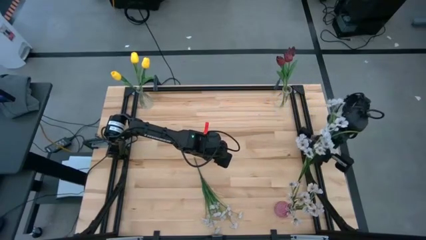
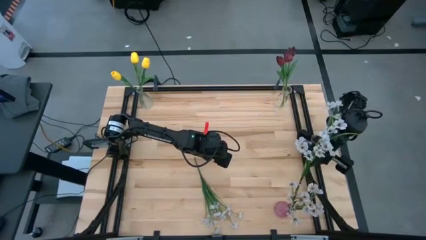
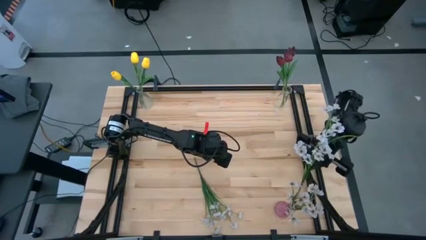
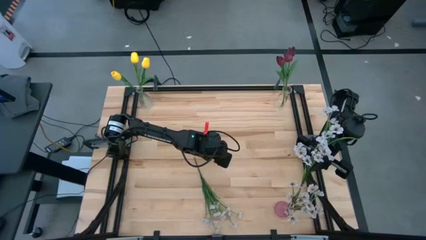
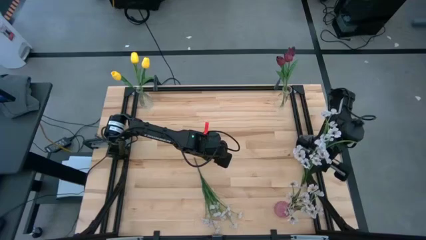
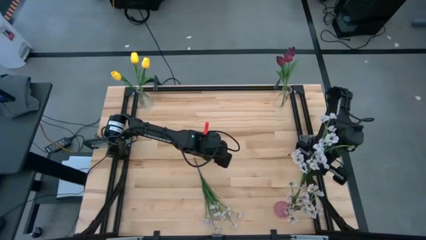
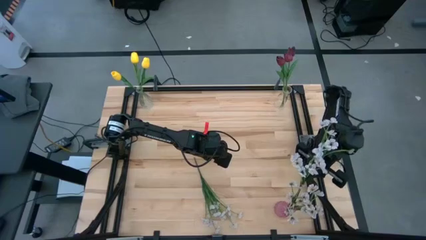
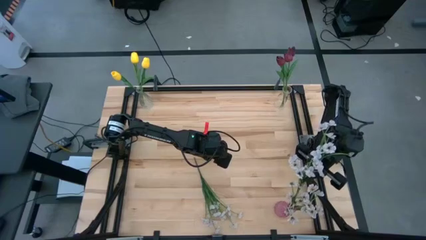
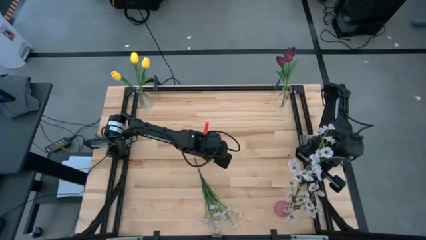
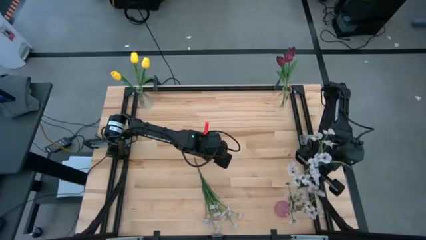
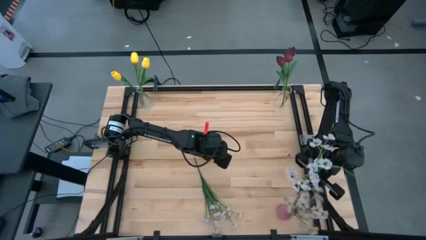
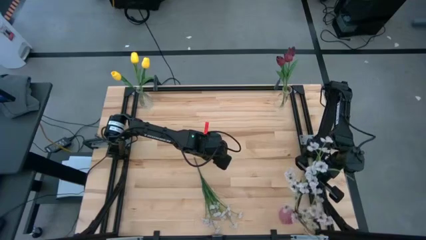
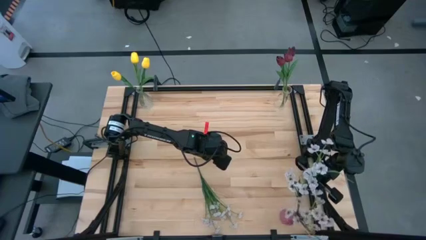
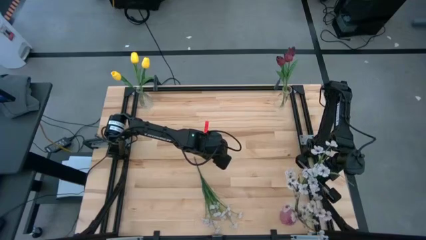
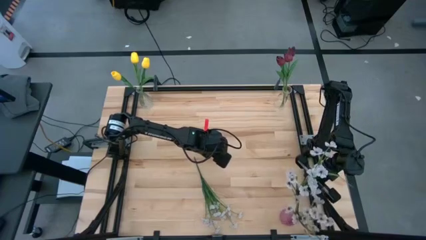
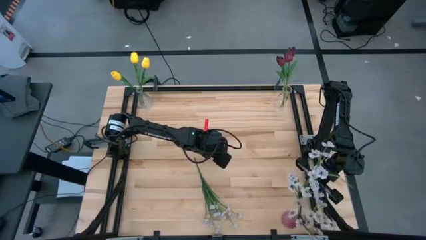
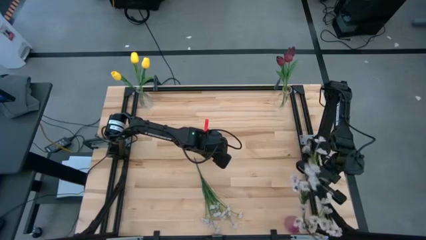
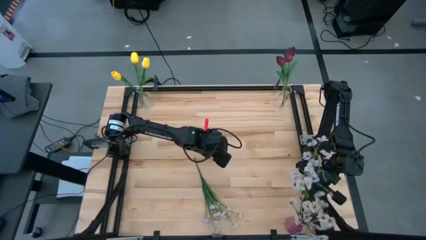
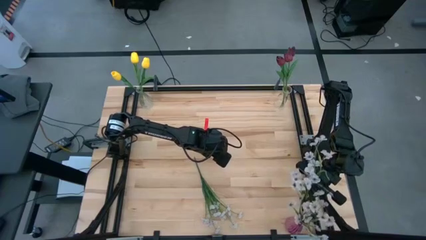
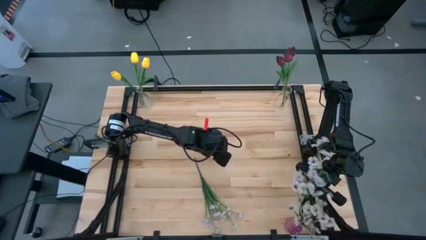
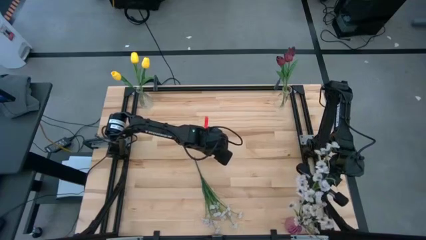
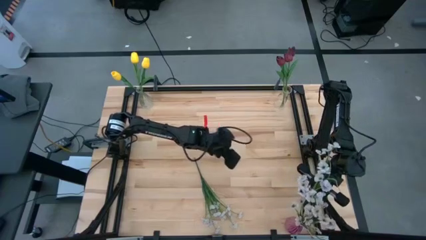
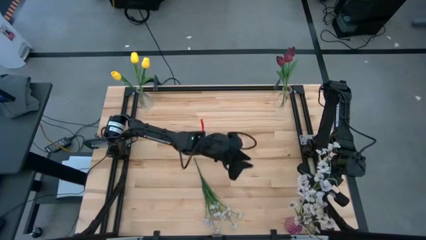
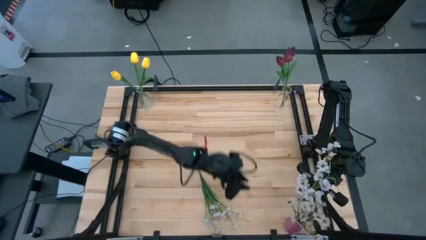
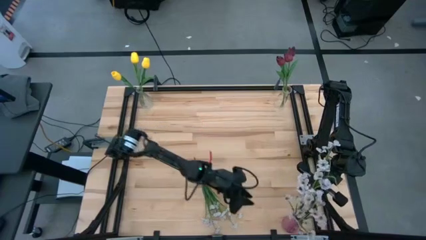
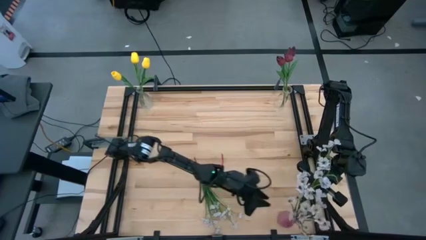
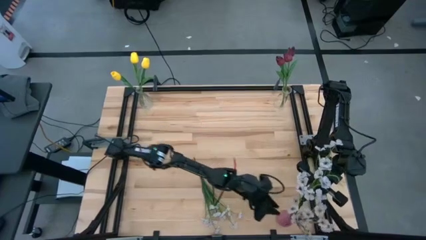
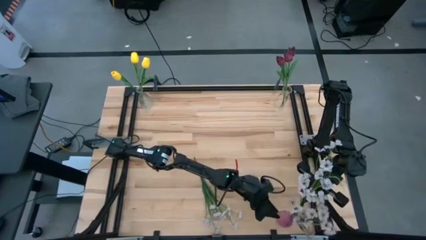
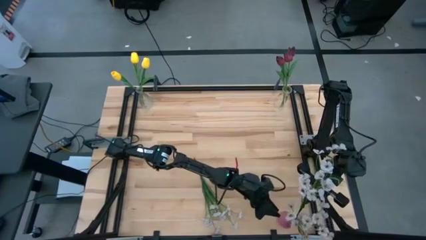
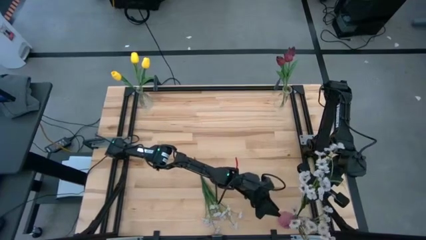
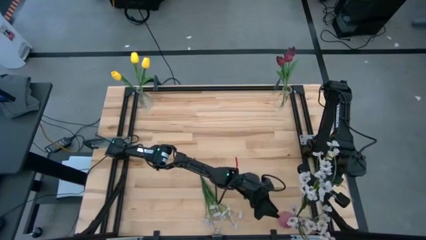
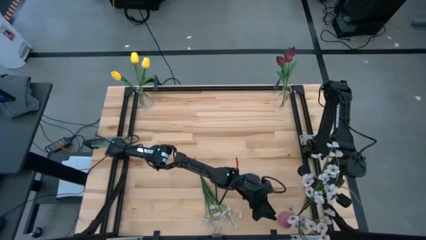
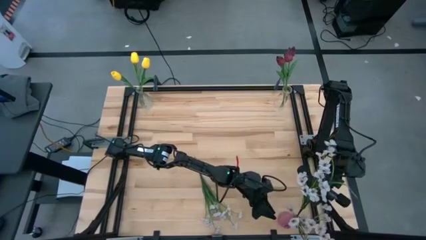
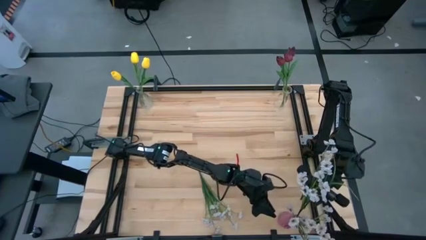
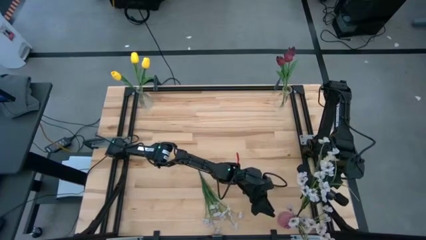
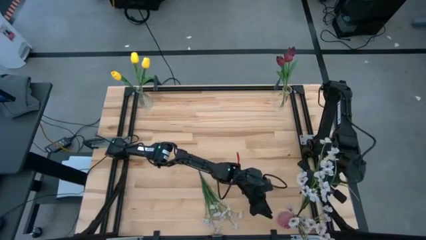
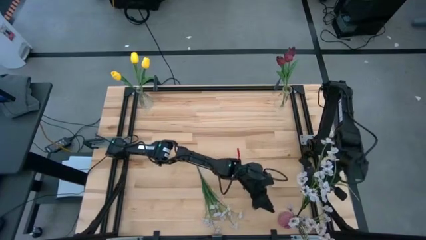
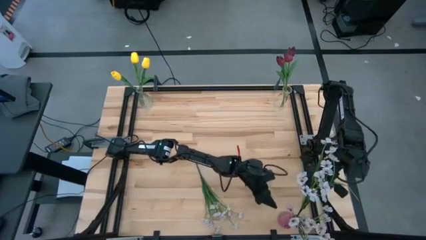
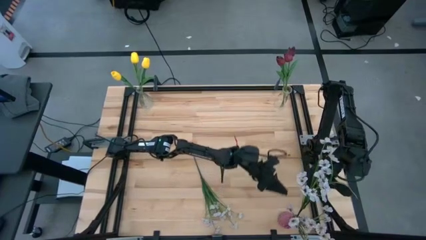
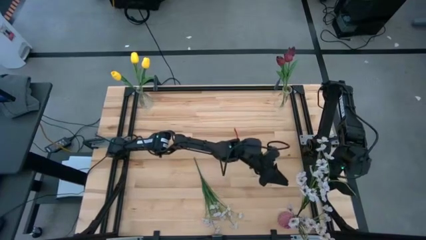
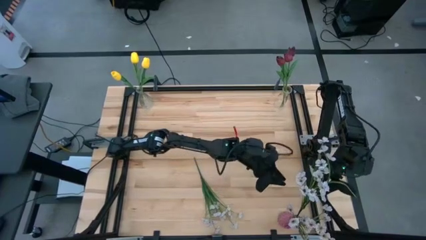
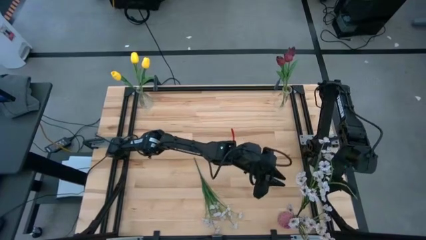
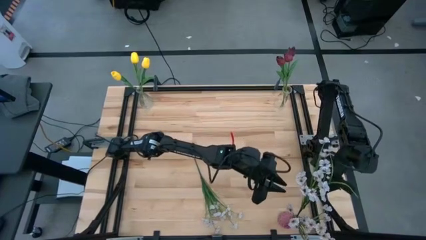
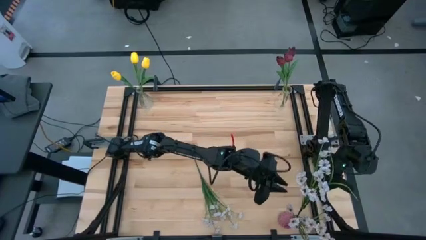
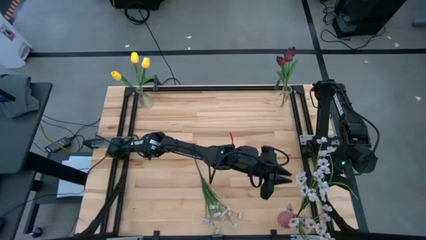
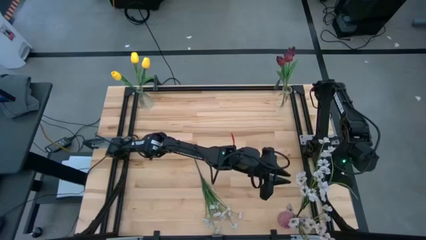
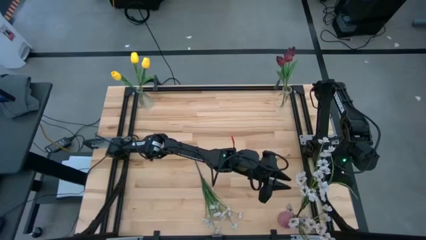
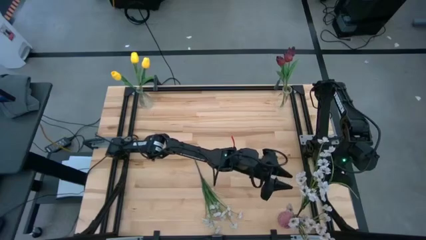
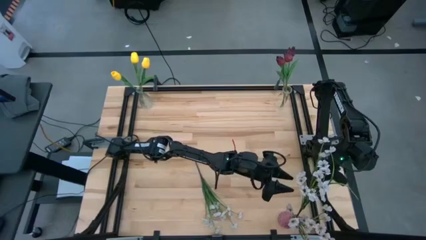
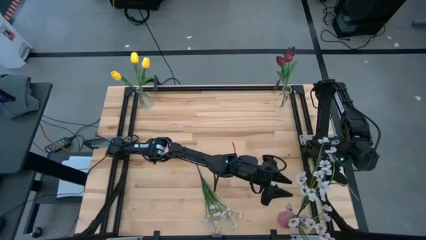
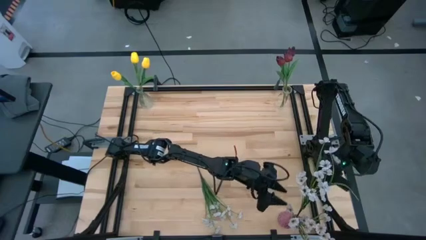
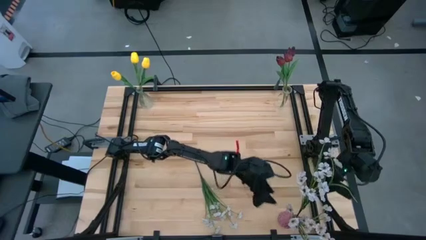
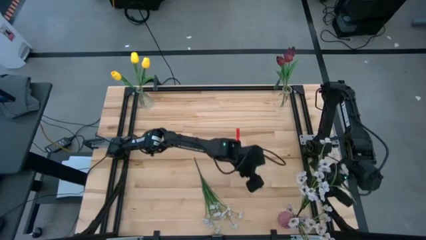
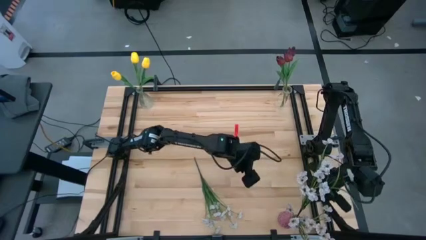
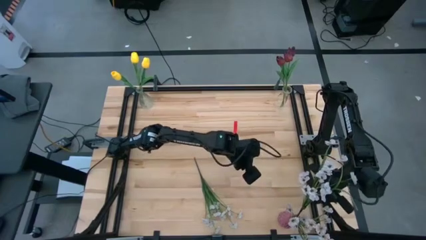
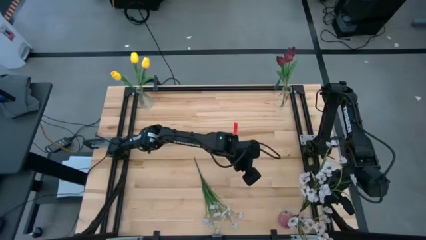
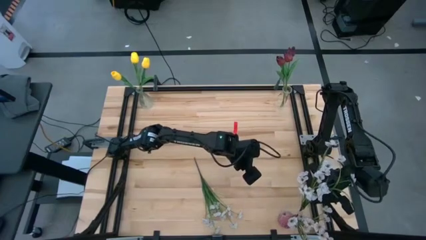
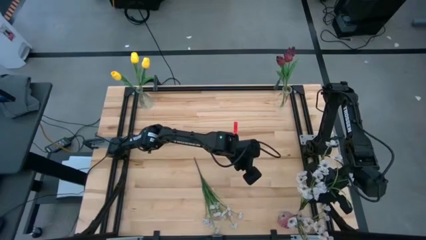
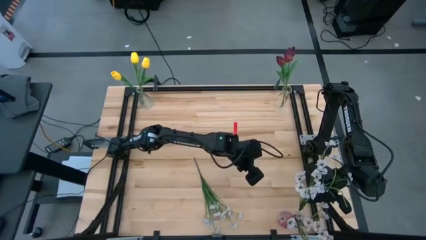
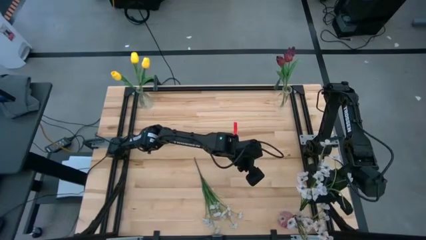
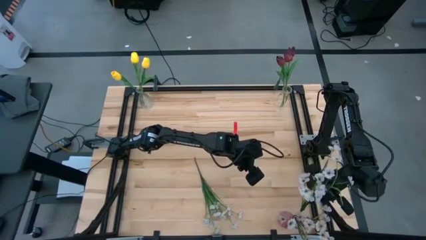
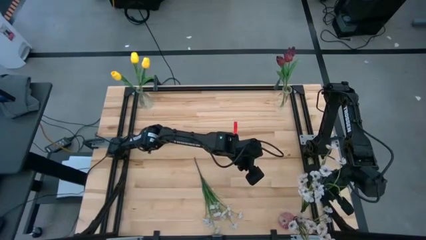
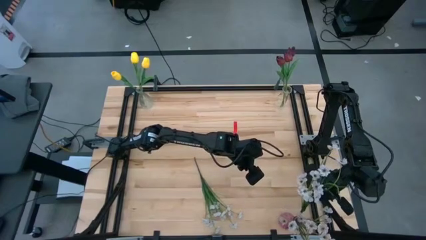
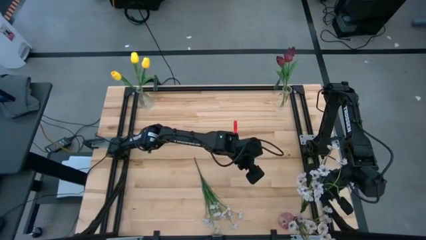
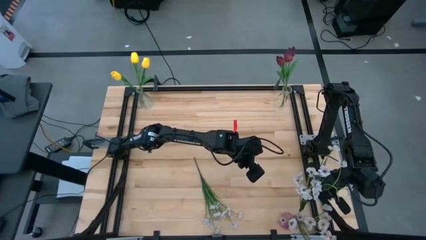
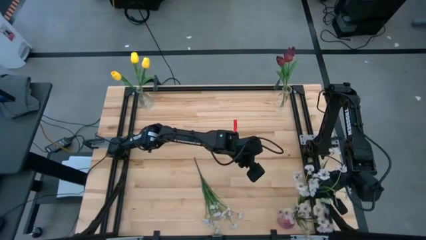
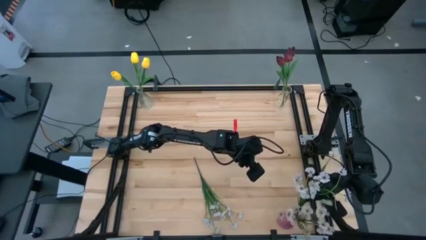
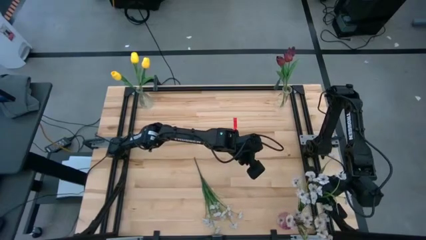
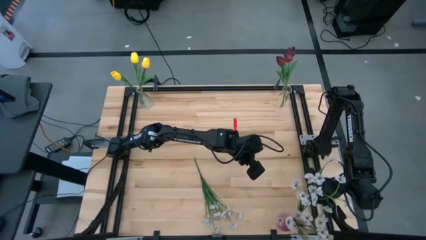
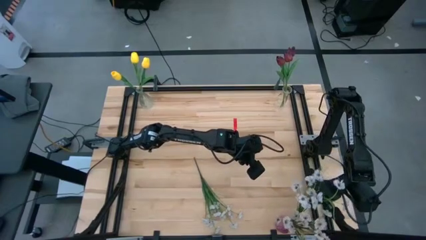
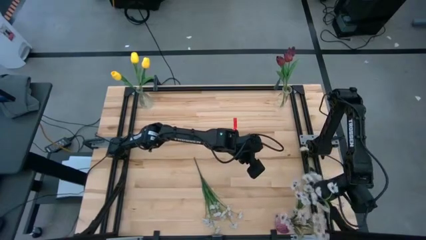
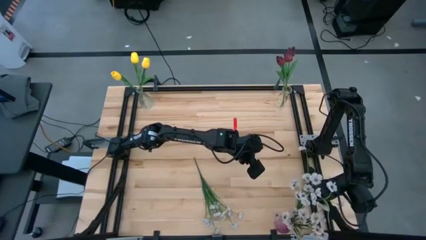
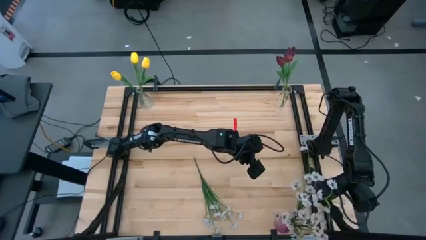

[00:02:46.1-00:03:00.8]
Task: Sort flowers into vase by color
Put the top white flowers into the purple vase
